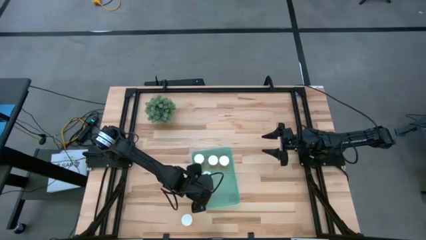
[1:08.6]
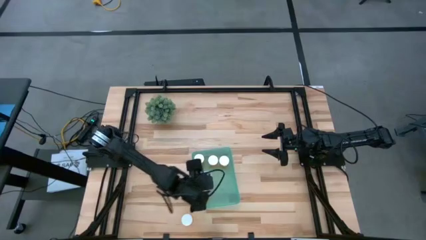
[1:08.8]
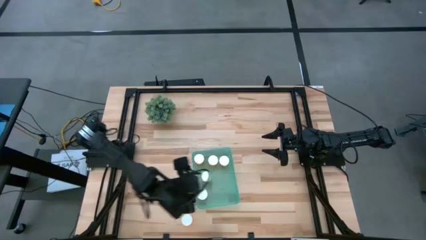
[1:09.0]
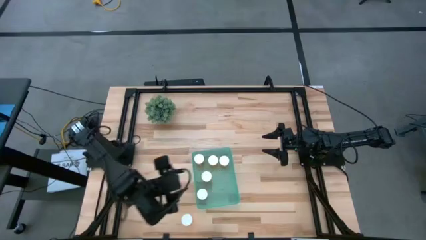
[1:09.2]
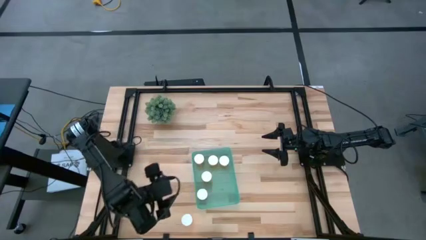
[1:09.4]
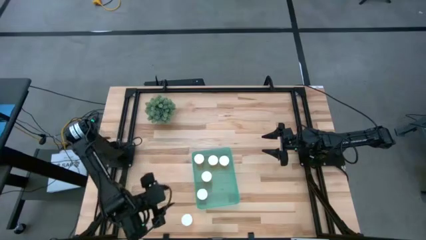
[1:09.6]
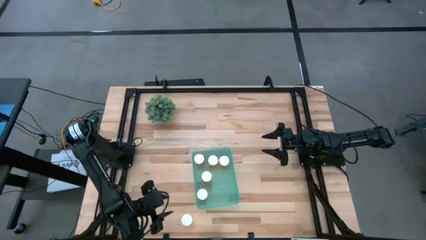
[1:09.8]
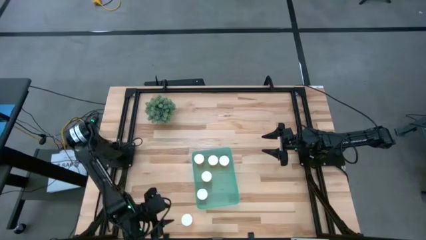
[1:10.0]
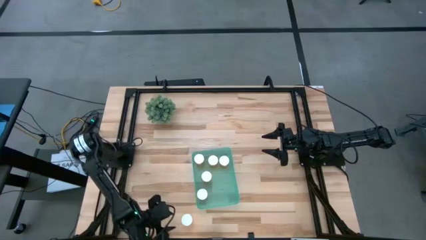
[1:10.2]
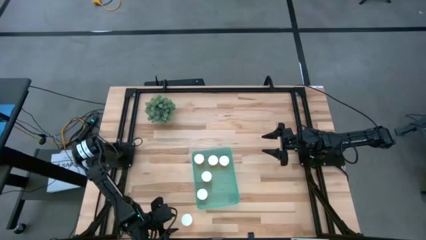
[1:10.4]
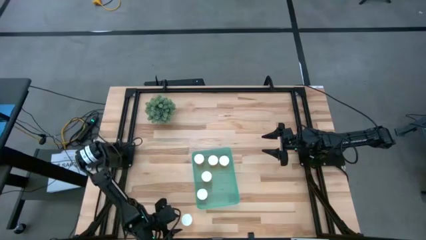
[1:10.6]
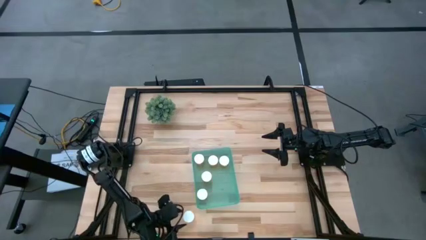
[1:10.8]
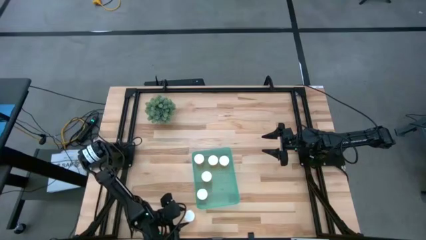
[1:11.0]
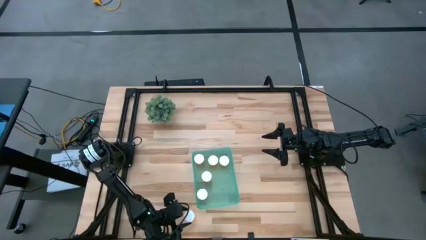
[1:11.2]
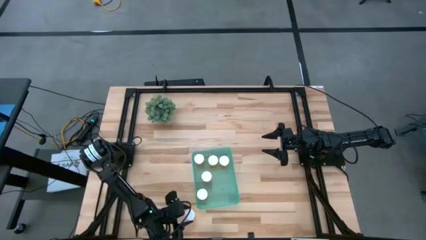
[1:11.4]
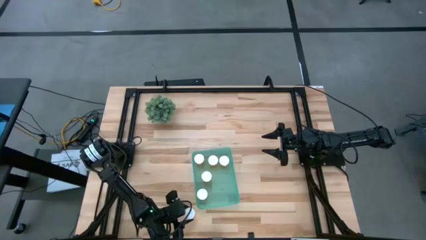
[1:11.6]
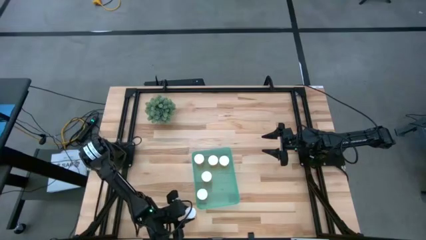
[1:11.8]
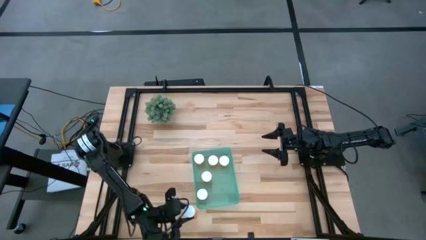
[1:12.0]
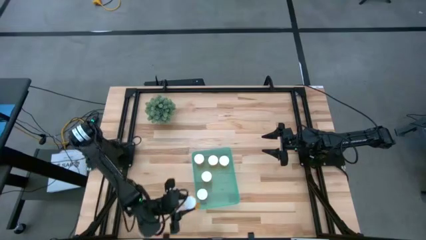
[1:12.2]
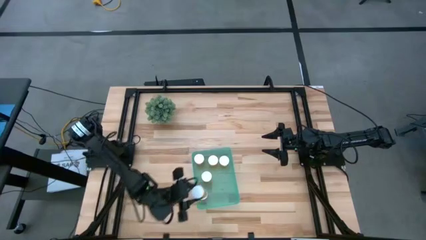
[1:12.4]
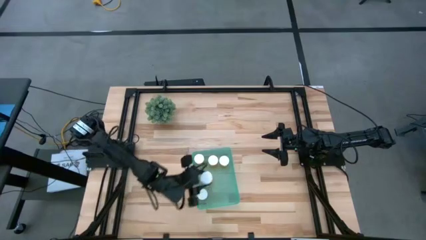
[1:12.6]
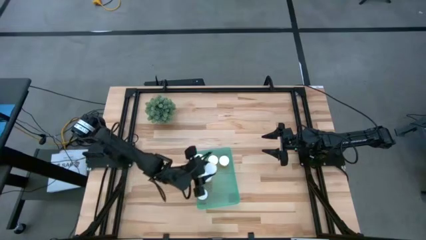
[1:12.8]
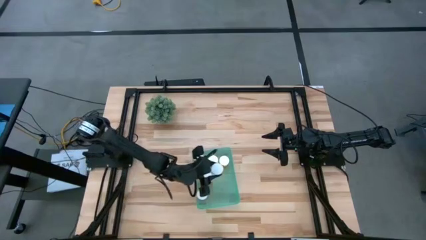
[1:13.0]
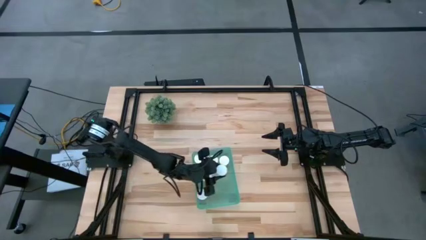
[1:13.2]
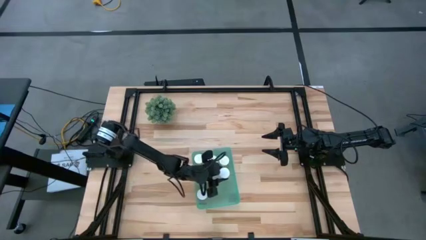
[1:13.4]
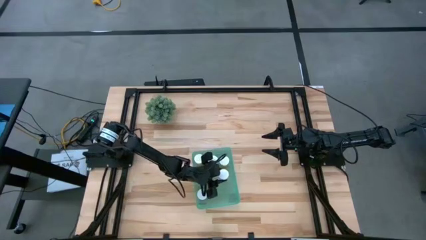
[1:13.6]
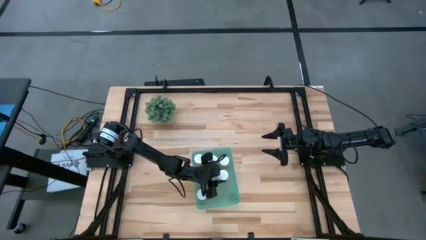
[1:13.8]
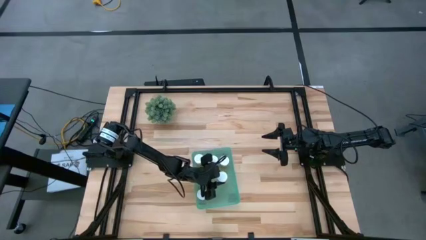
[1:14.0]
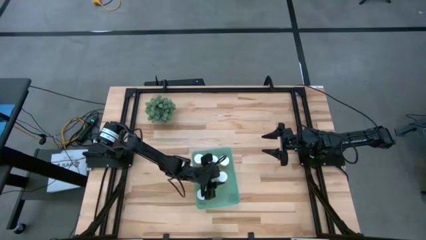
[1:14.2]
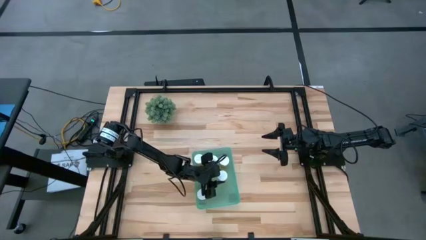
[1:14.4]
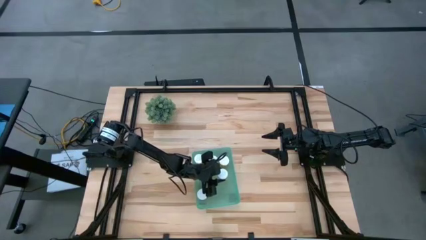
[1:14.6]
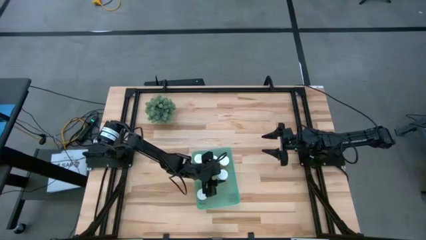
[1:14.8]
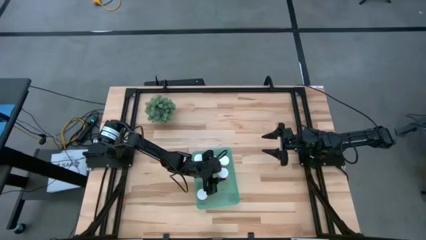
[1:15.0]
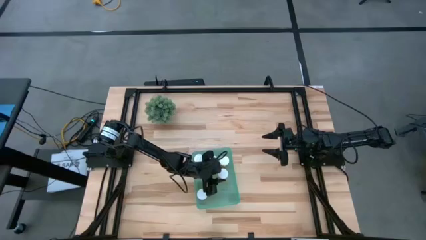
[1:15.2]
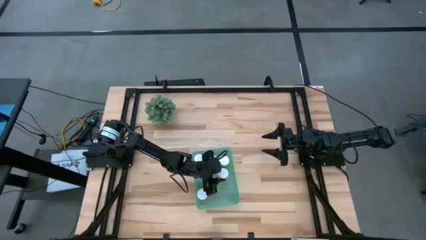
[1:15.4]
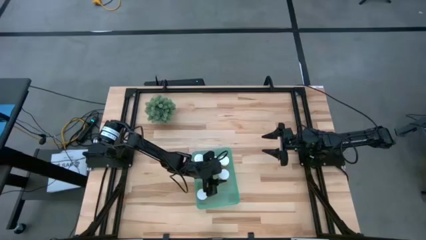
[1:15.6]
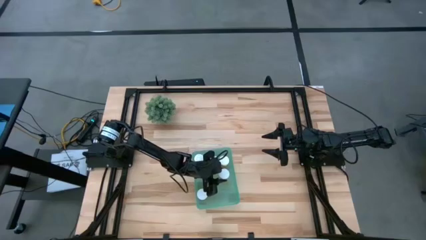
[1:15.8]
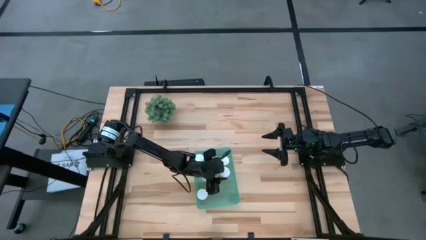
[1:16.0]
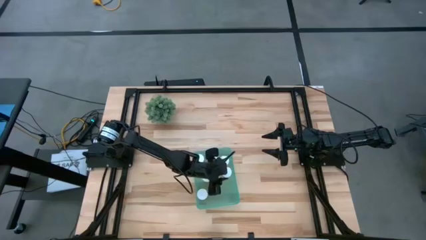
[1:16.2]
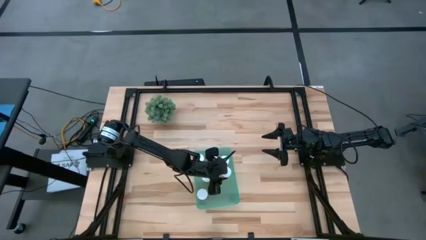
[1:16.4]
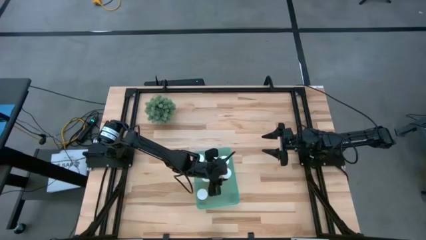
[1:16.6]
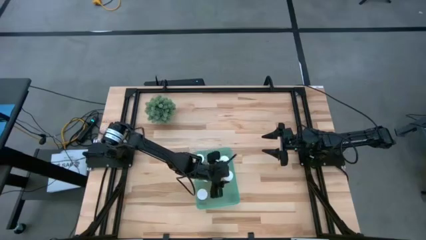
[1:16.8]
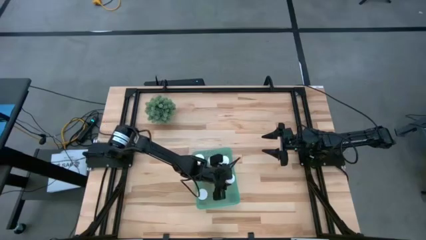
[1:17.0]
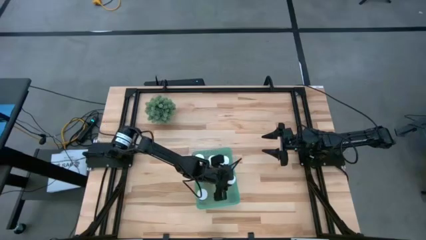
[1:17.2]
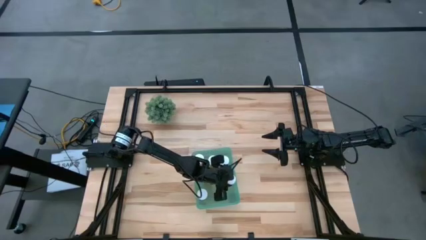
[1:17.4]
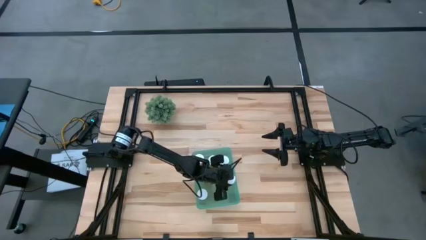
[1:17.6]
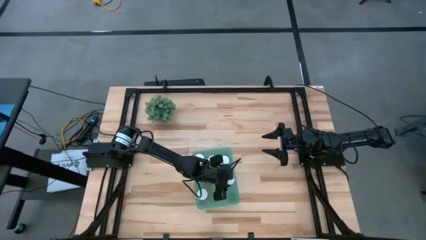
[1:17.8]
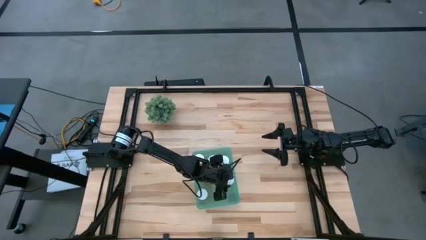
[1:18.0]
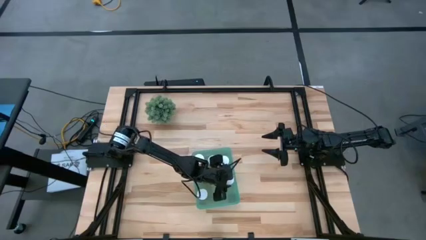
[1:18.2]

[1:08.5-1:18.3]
Task: Pick and place pill bottles into a basket
Put the orange pill bottle into the green bin

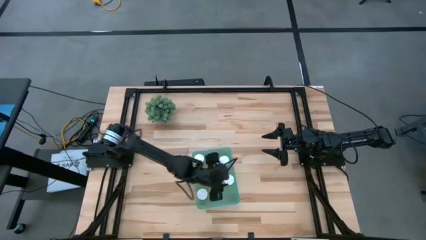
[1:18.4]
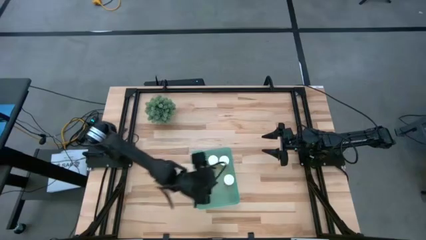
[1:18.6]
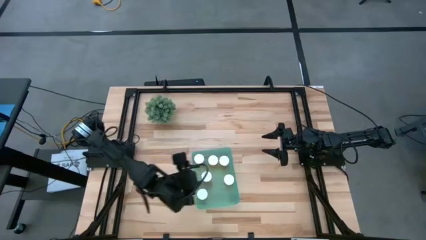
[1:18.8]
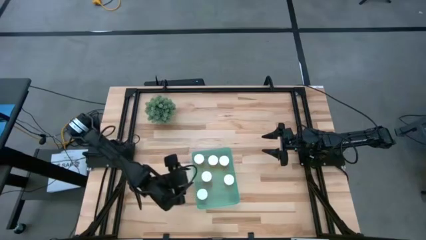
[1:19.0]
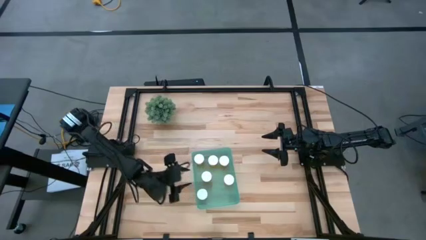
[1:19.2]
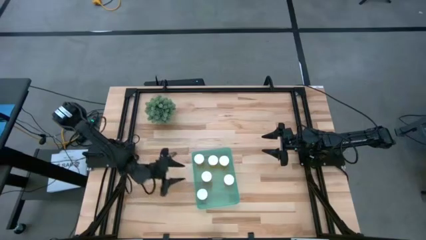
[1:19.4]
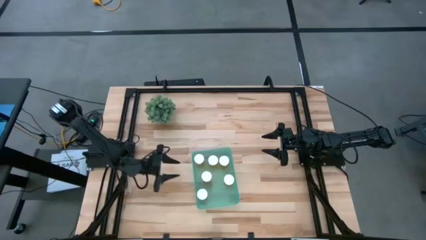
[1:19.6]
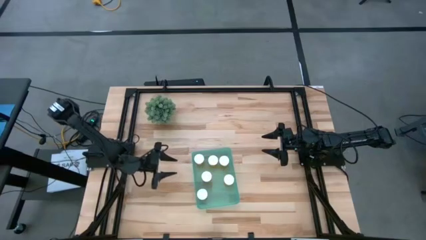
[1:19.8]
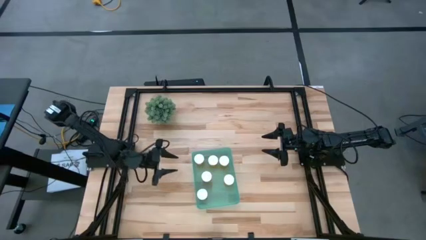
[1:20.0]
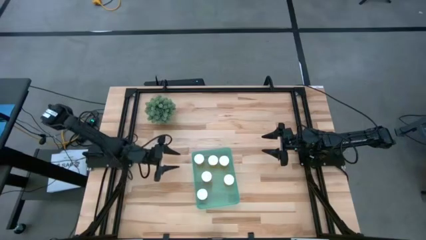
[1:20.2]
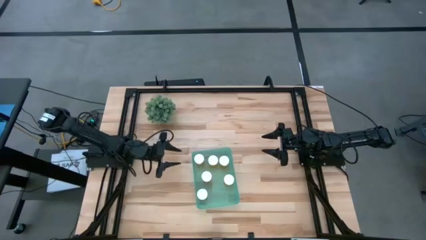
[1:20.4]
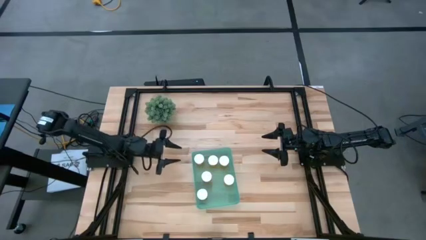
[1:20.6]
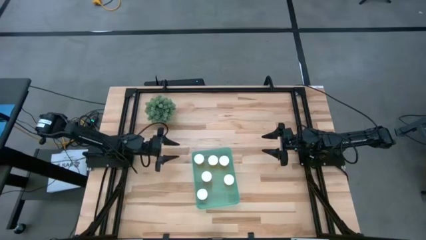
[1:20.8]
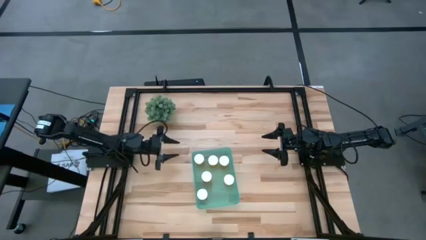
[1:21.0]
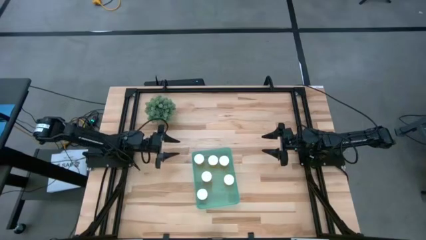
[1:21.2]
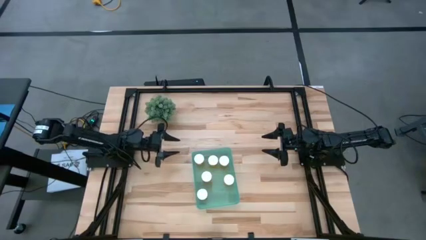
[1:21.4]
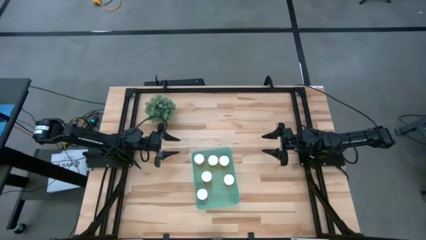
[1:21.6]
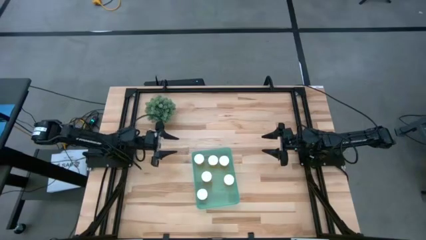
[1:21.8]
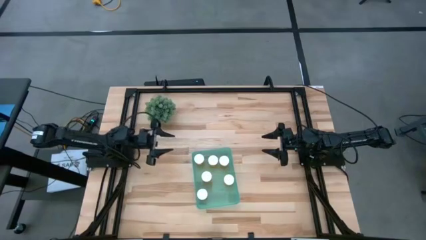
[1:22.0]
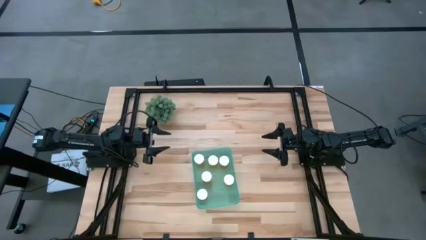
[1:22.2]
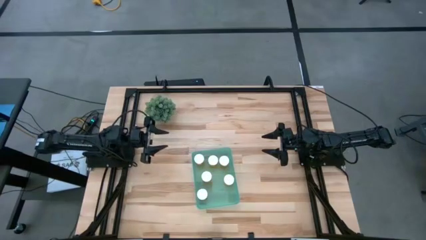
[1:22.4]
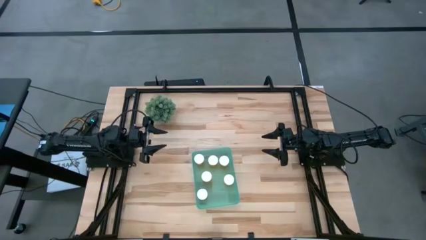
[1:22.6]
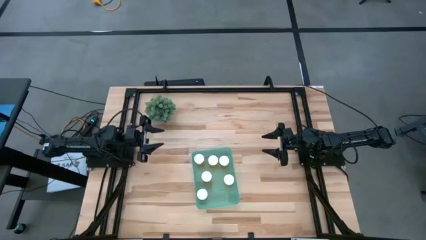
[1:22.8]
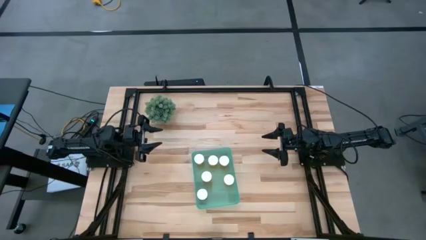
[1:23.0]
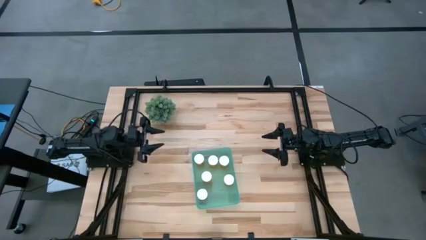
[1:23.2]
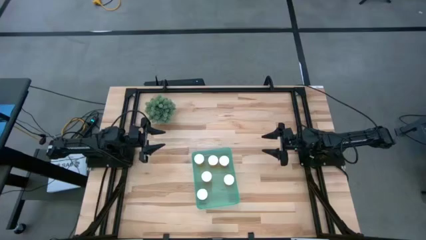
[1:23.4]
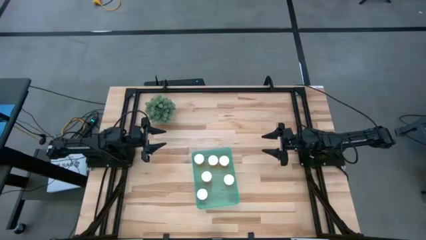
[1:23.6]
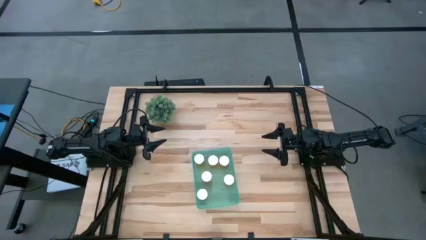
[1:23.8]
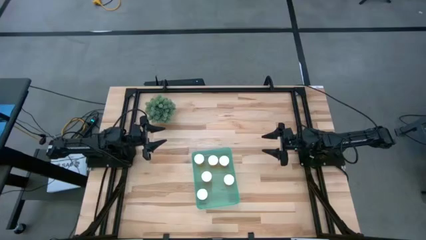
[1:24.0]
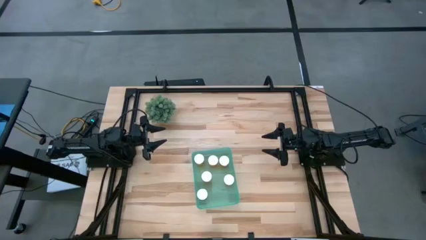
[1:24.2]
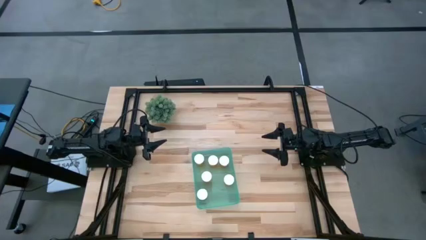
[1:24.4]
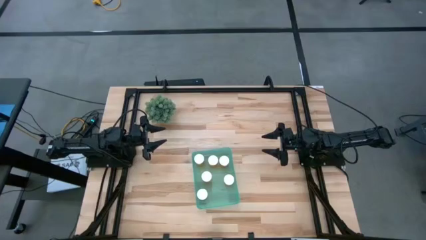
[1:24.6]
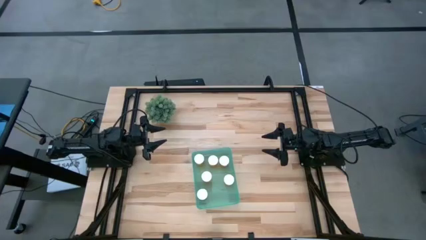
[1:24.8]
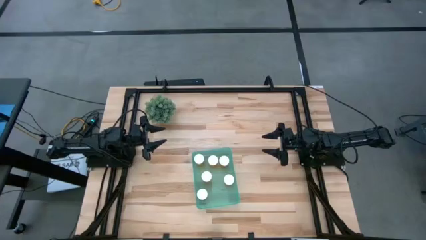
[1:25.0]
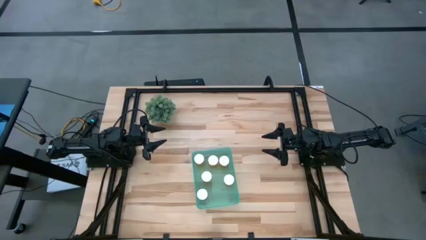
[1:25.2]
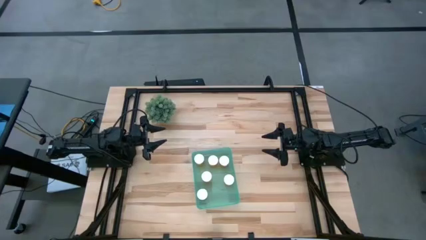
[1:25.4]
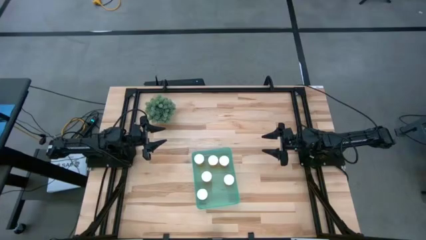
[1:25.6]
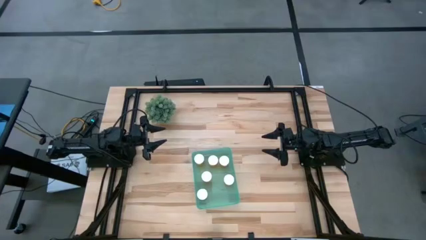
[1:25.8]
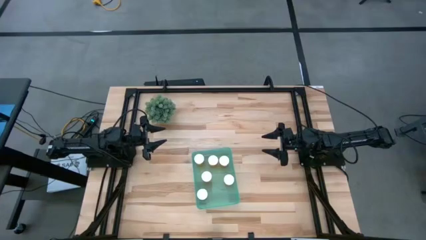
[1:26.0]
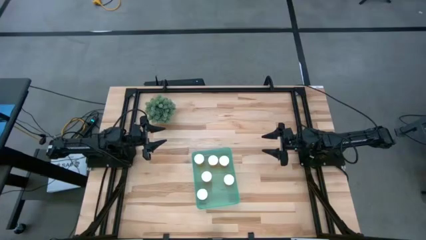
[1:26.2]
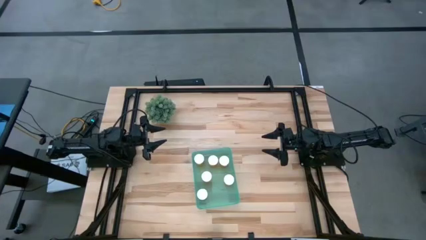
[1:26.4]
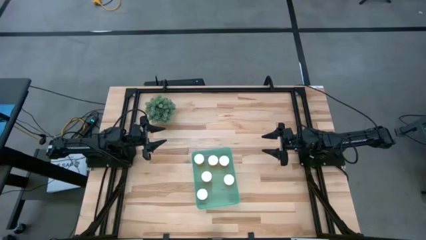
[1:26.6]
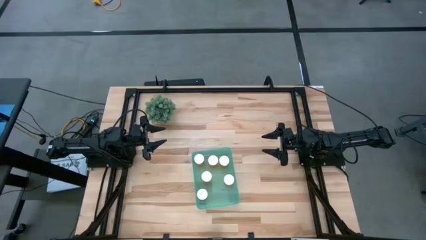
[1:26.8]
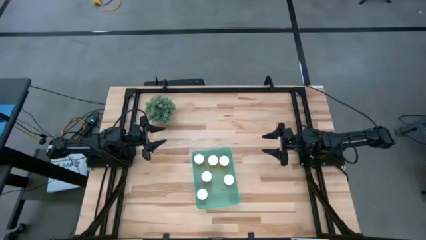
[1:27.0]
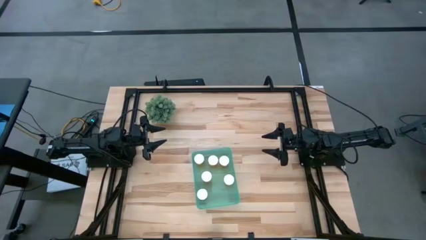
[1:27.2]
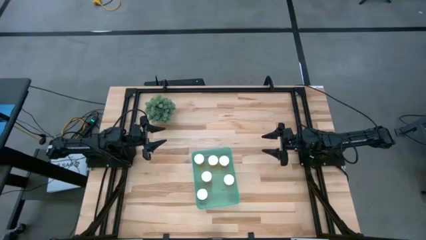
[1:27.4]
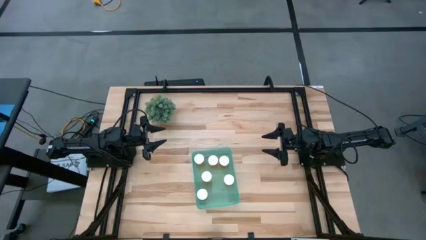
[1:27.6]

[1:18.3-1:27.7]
Return to Home Position
